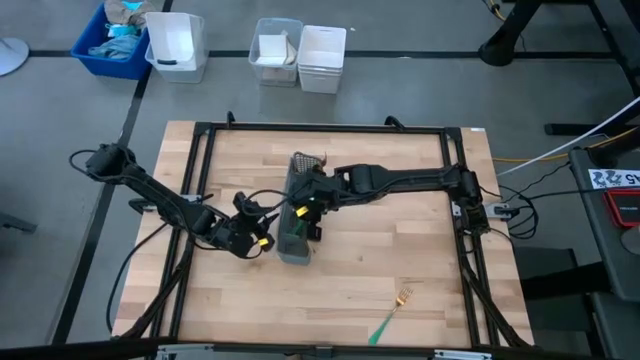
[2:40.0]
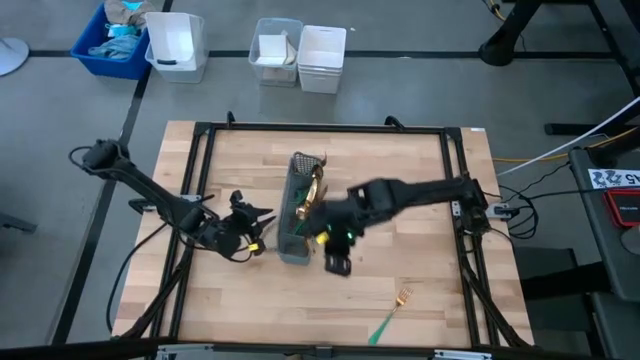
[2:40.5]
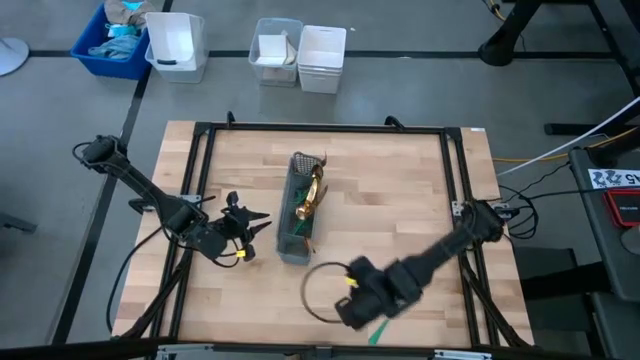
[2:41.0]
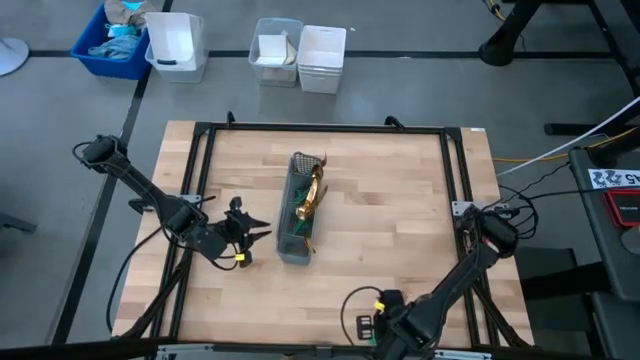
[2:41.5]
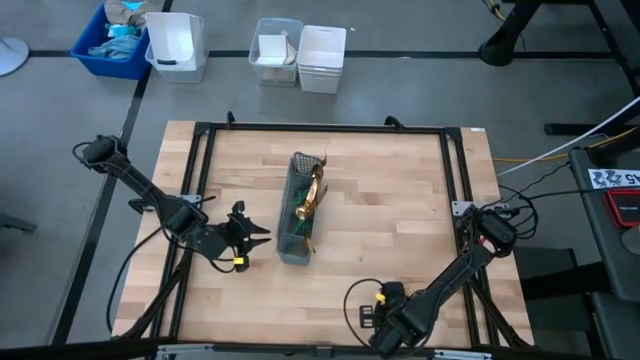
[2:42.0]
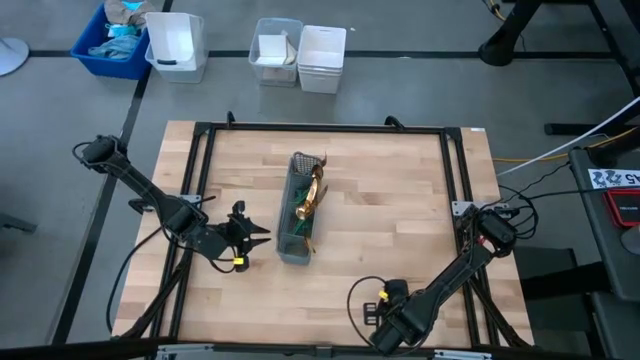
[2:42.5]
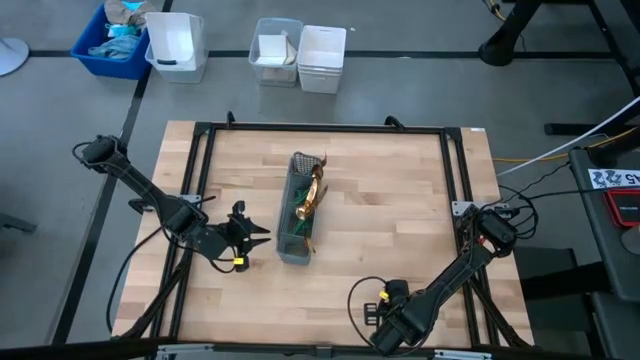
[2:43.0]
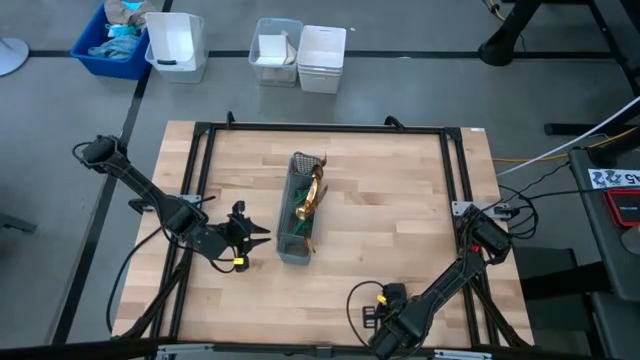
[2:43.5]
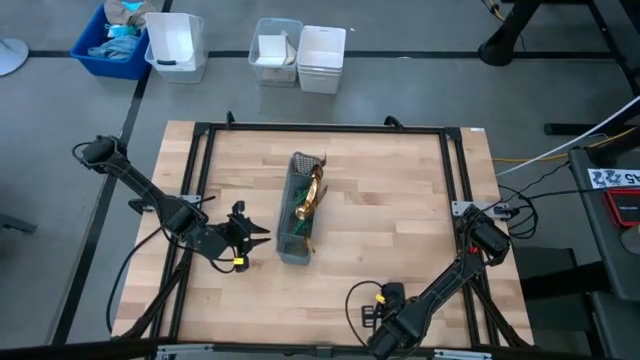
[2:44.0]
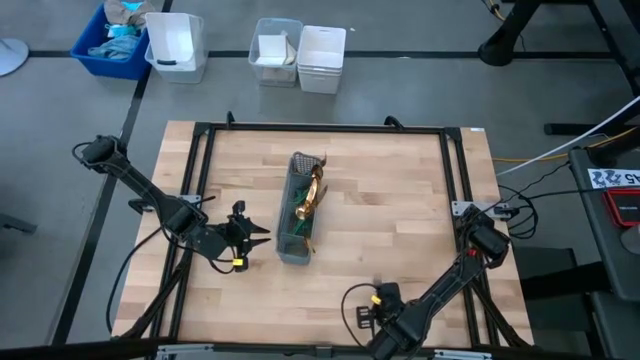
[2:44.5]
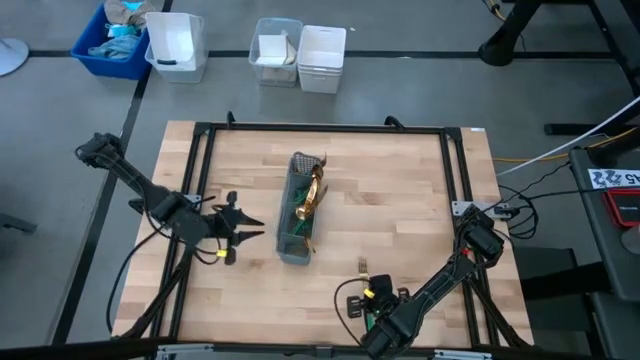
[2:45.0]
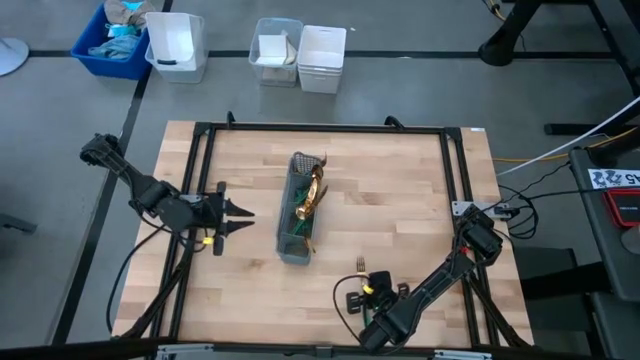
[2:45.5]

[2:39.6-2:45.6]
Task: Sort silverware
Put the green fork into the gray silverware rack

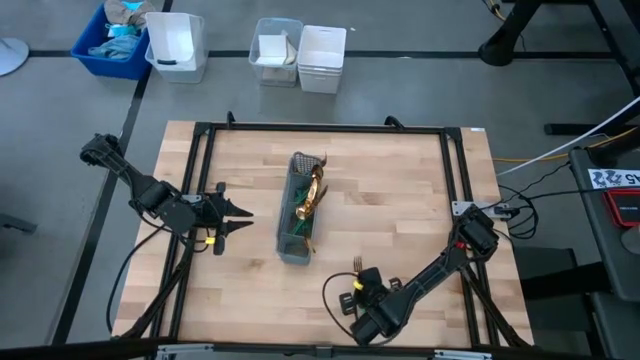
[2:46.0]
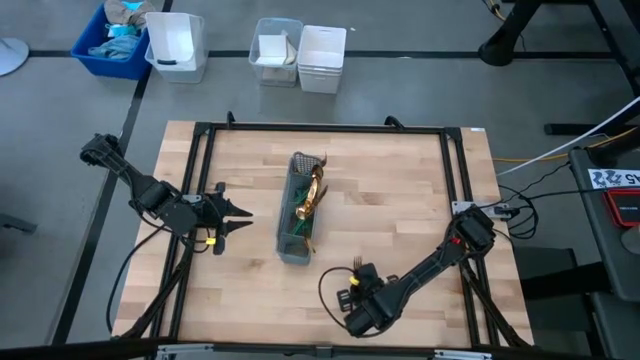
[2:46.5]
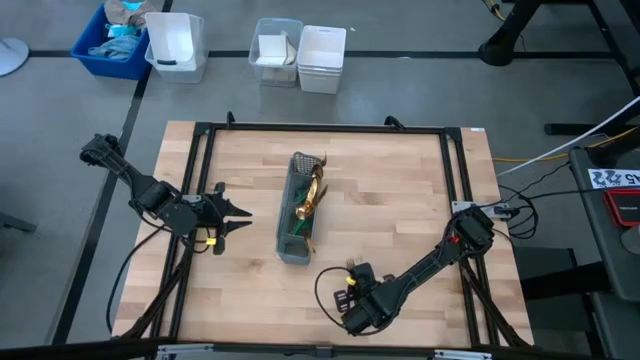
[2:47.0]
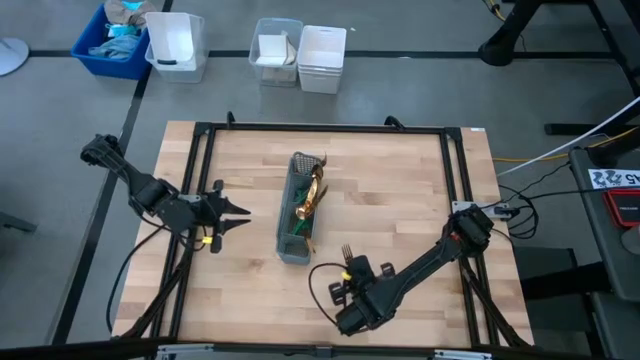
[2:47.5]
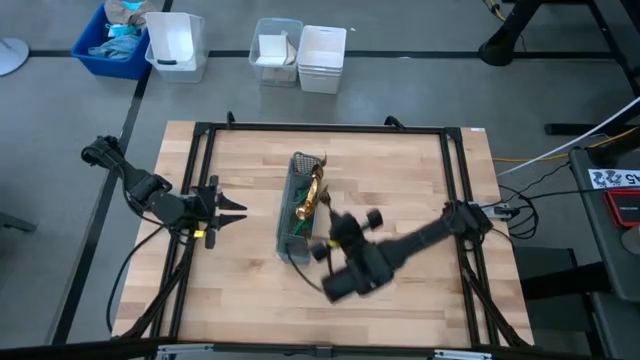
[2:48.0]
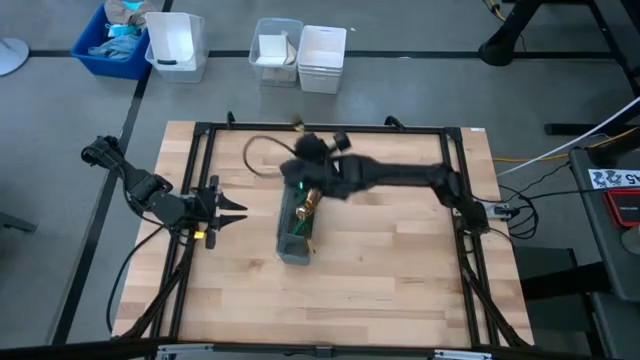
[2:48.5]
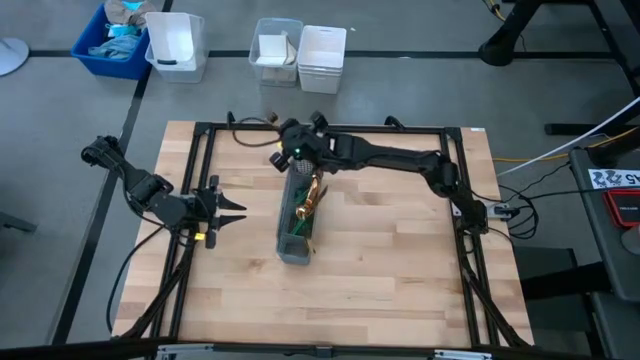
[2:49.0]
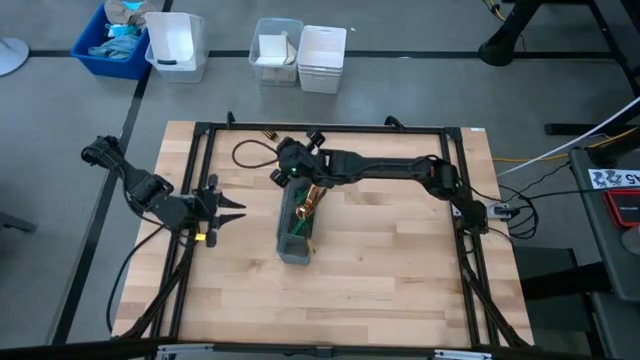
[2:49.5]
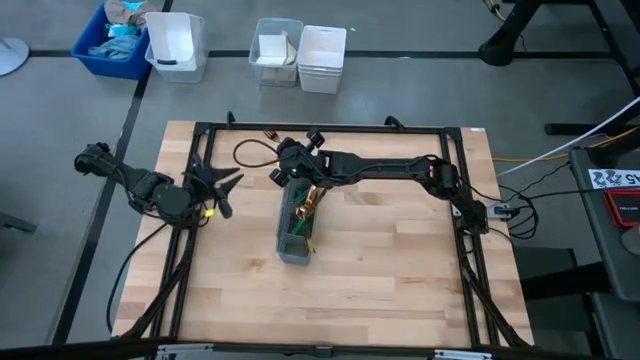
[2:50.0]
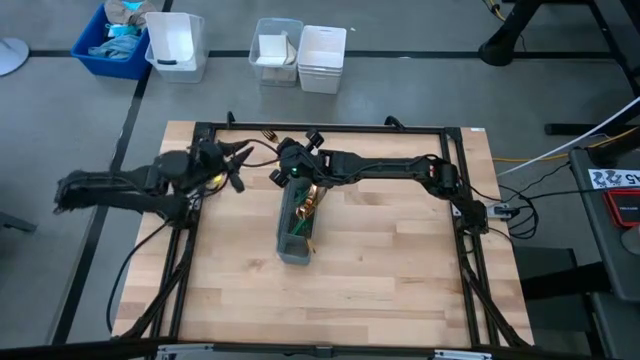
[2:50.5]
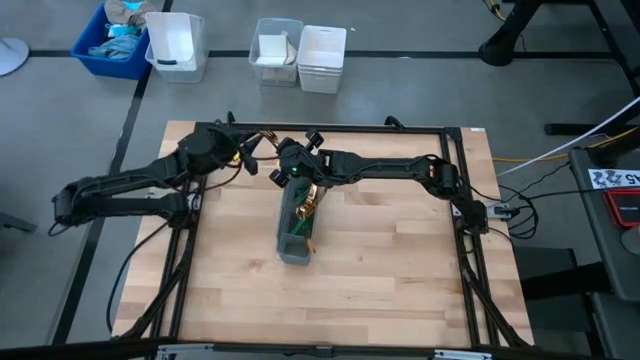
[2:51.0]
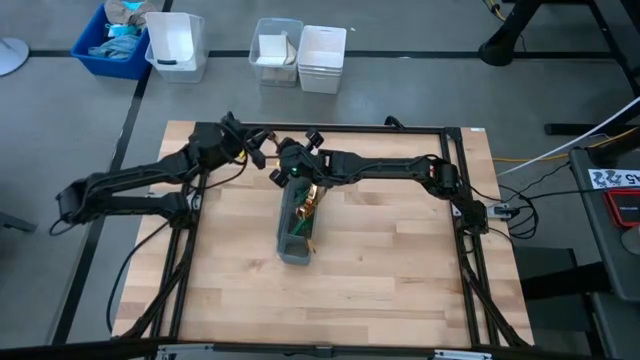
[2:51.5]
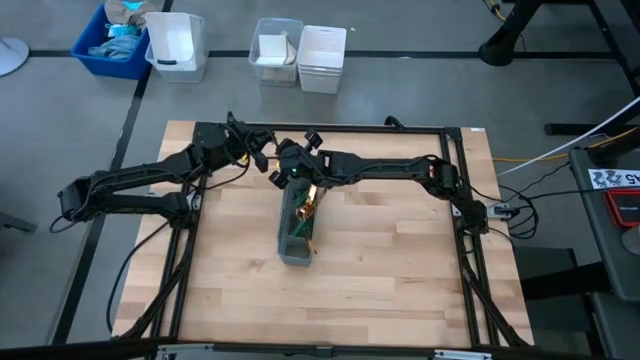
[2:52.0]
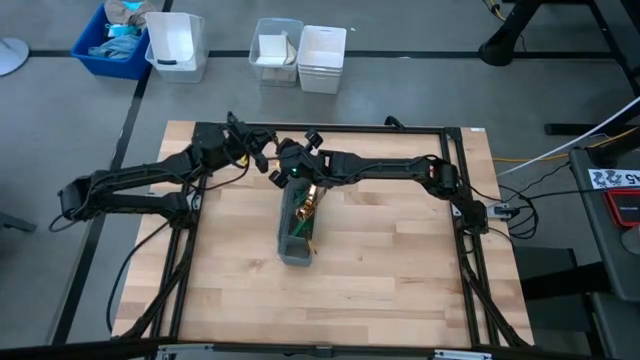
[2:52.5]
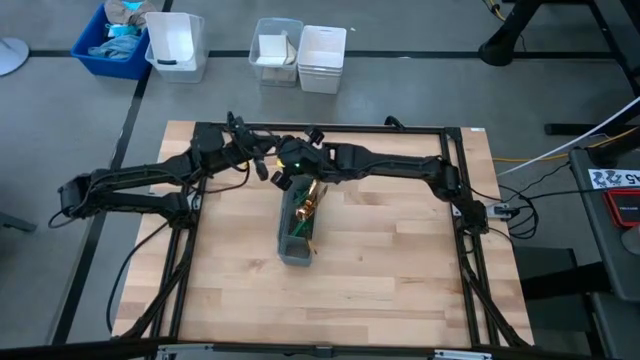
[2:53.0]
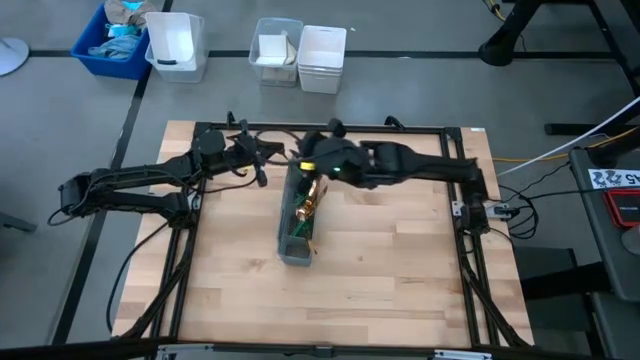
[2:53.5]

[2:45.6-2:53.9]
Put the green fork into the gray silverware rack

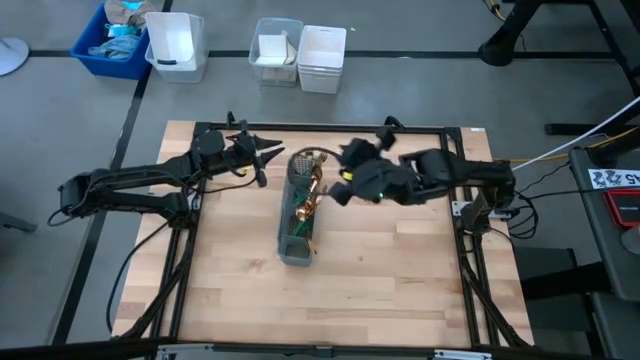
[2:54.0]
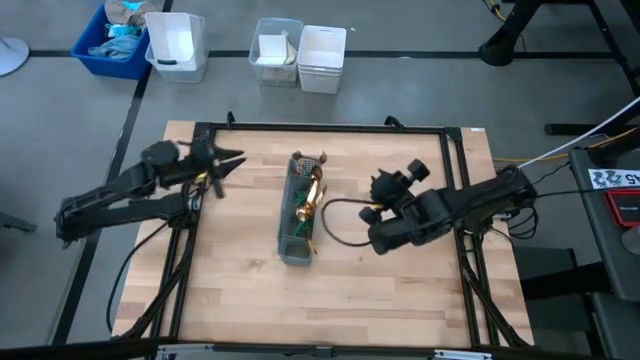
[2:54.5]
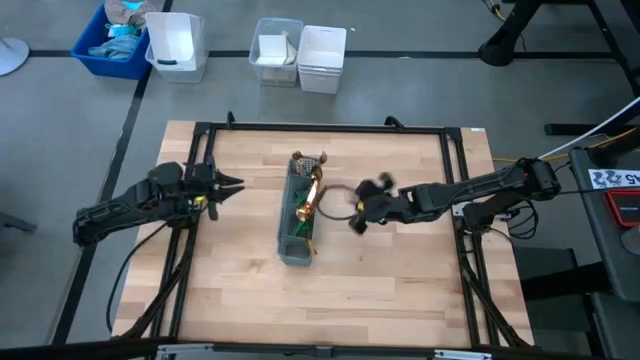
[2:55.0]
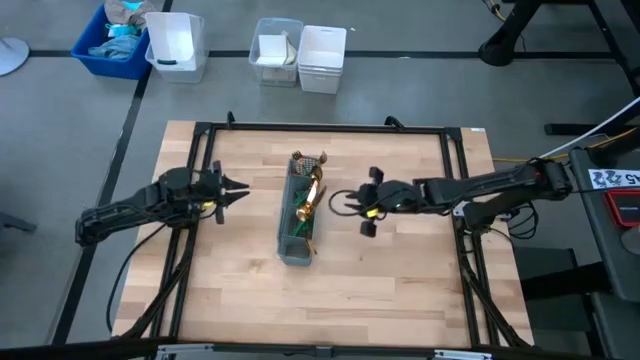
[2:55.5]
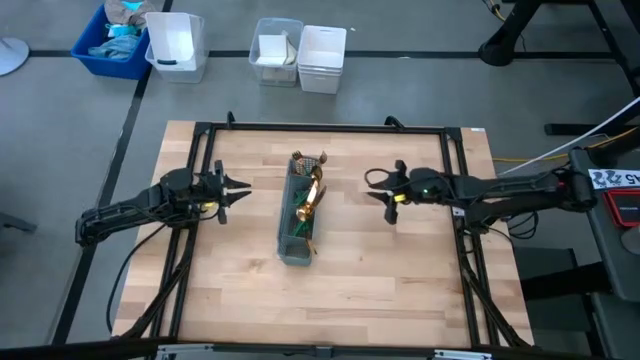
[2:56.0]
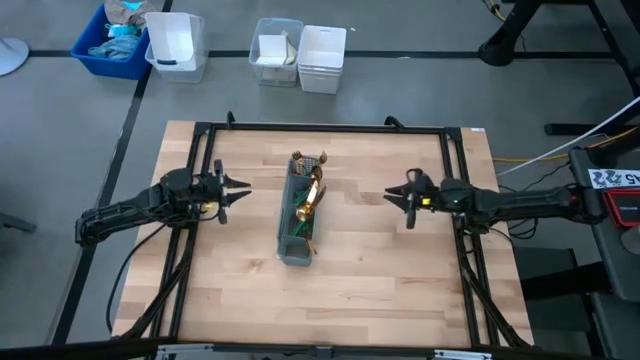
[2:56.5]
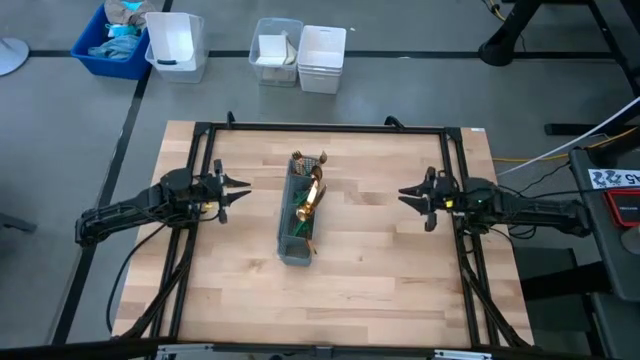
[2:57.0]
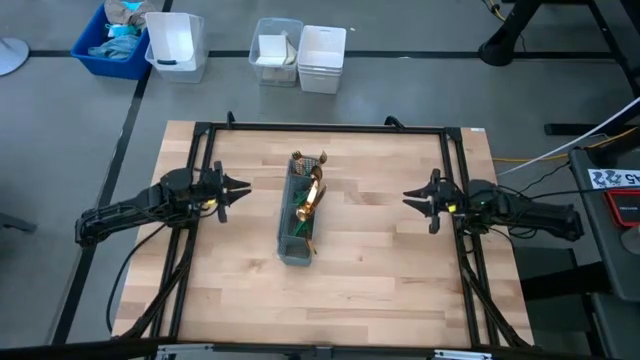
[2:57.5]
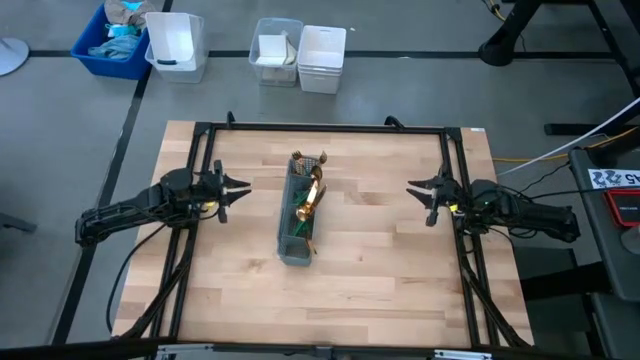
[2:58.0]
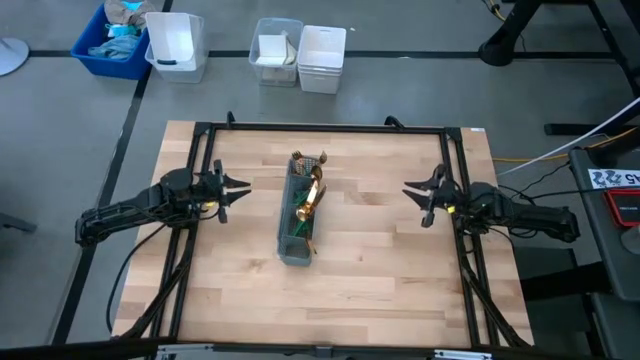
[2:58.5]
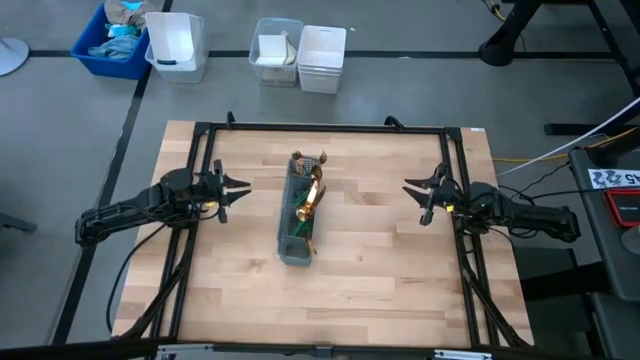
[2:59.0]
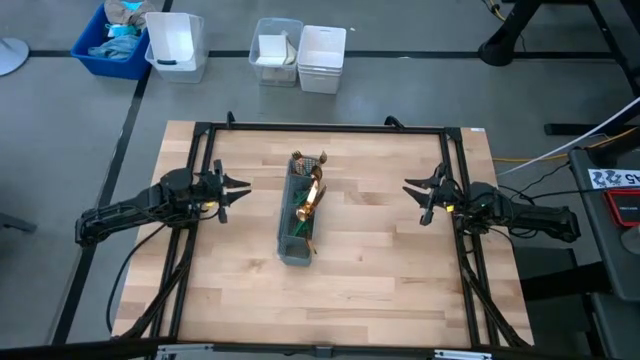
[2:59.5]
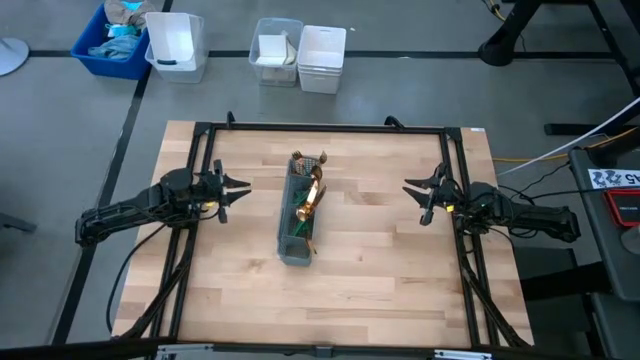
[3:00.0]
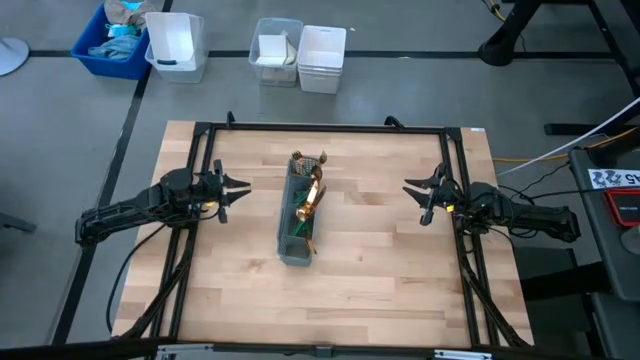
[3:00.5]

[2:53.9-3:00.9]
Return to Home Position
